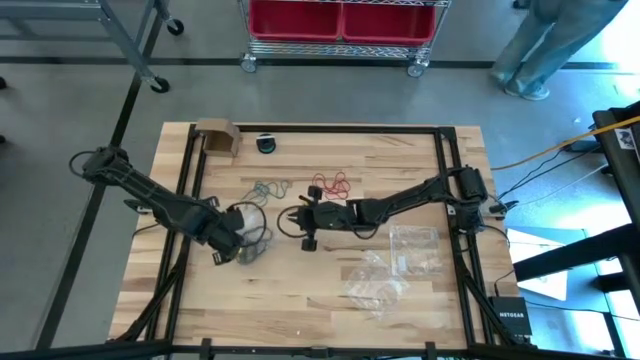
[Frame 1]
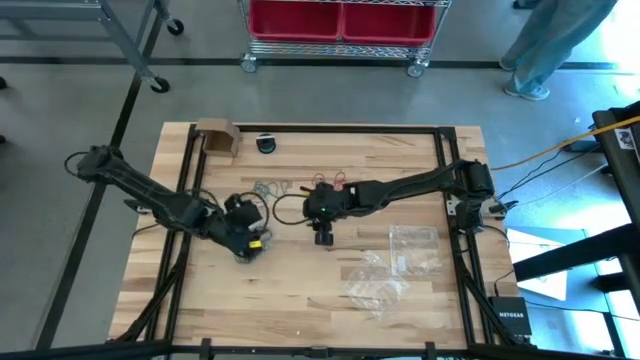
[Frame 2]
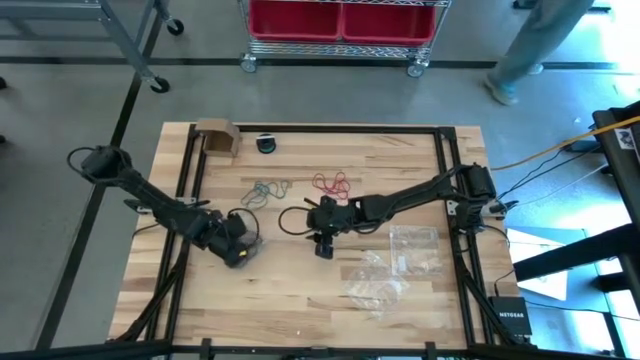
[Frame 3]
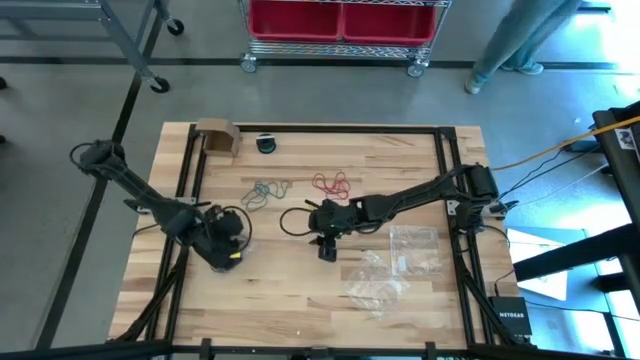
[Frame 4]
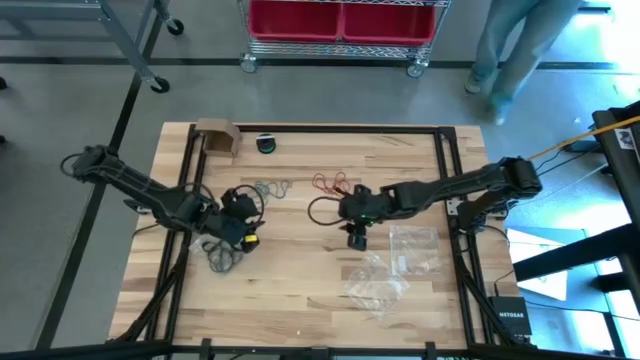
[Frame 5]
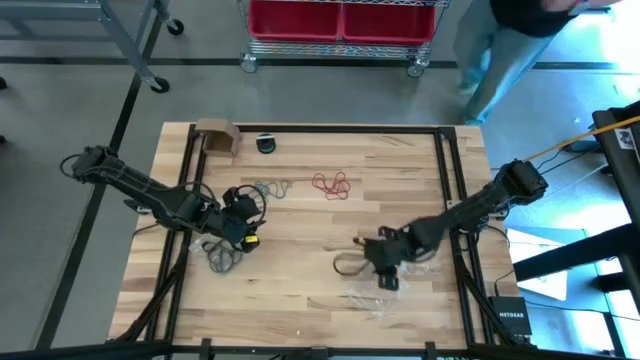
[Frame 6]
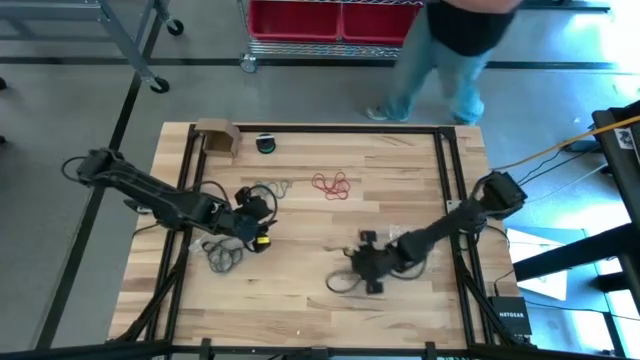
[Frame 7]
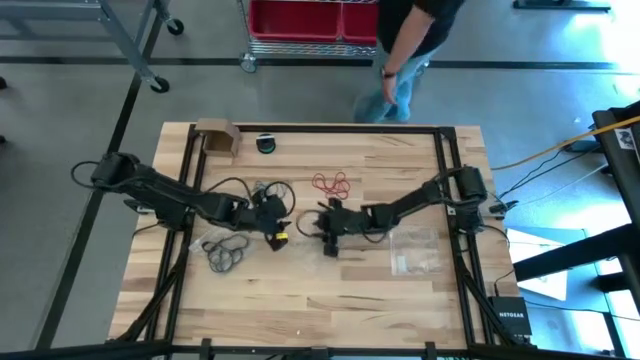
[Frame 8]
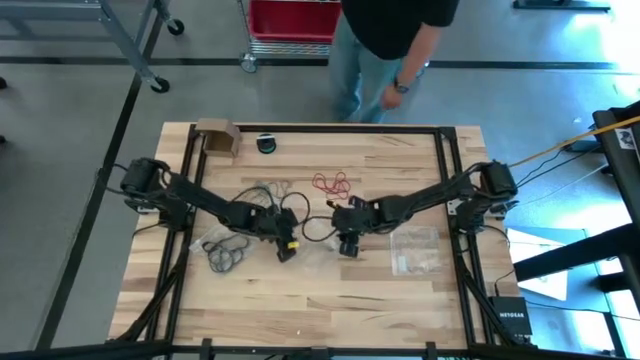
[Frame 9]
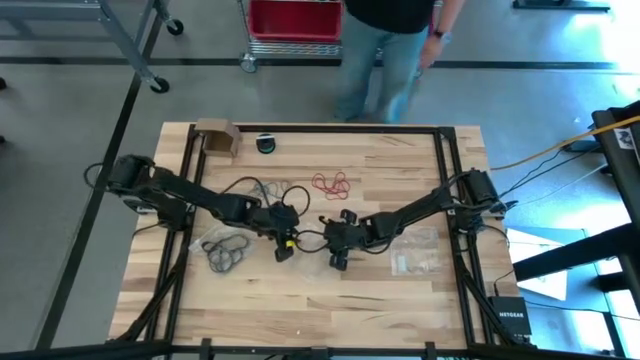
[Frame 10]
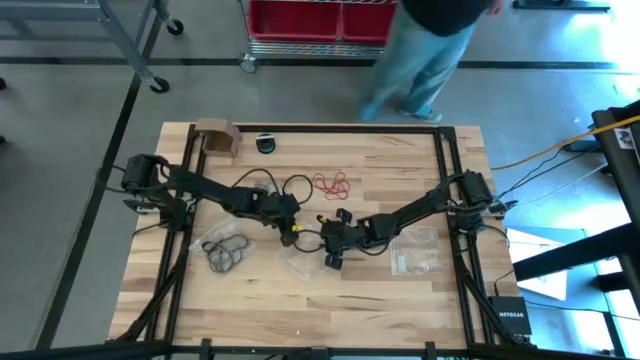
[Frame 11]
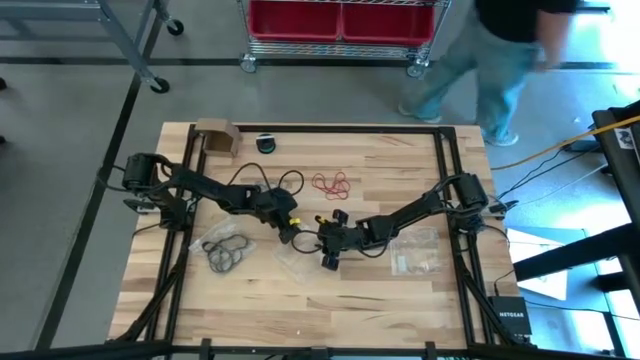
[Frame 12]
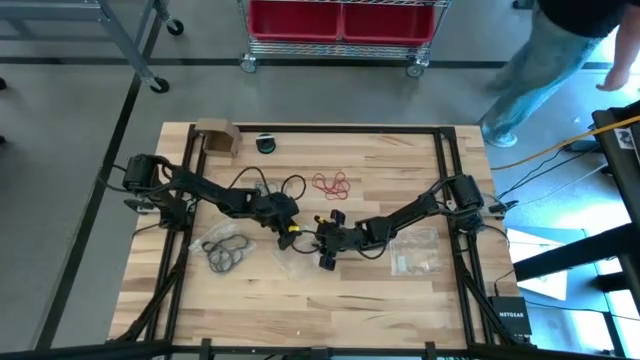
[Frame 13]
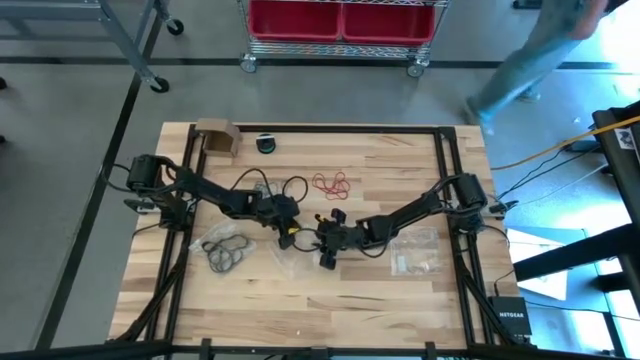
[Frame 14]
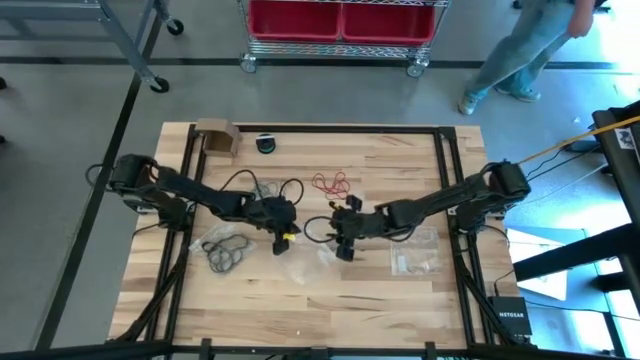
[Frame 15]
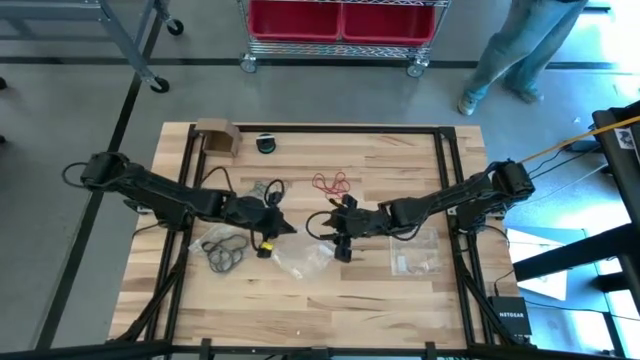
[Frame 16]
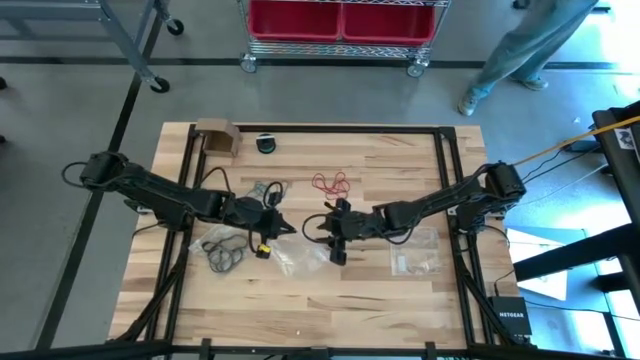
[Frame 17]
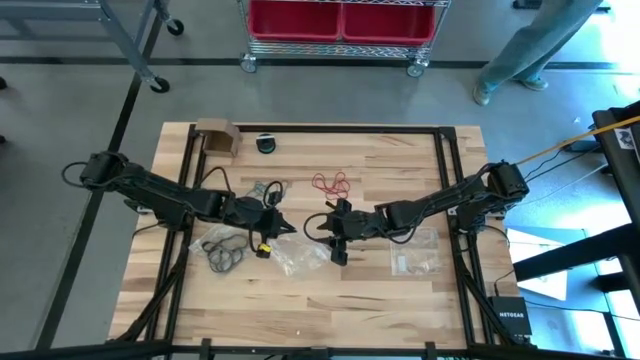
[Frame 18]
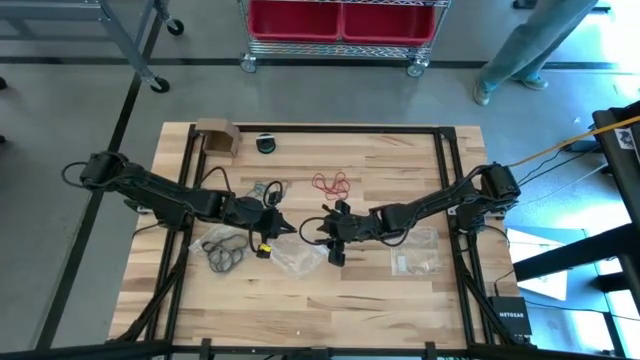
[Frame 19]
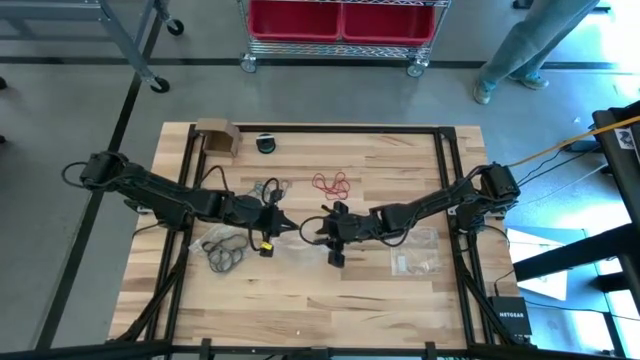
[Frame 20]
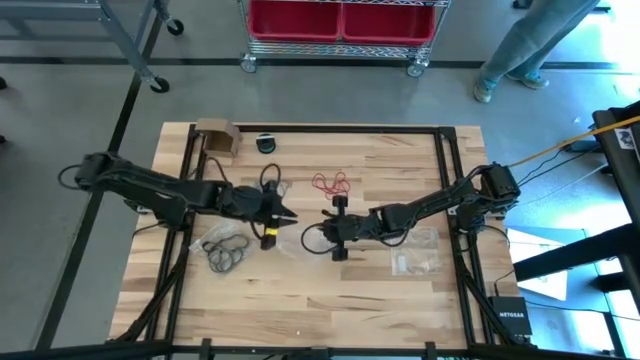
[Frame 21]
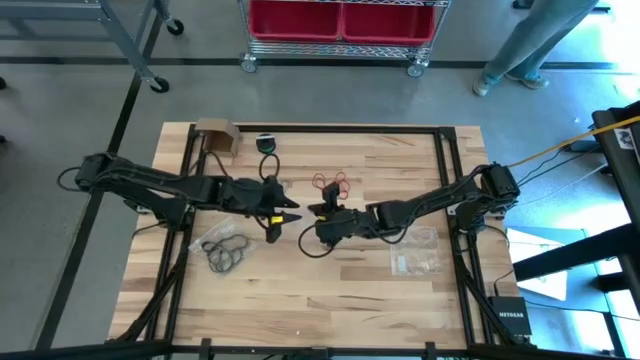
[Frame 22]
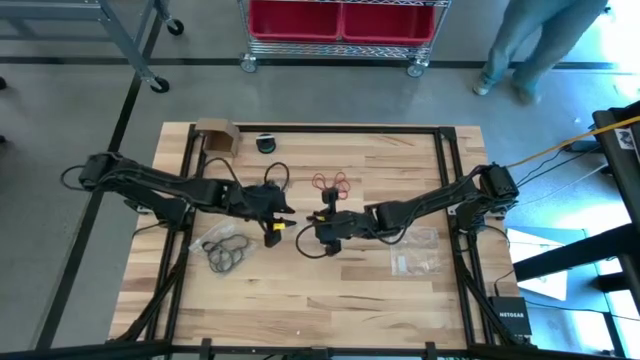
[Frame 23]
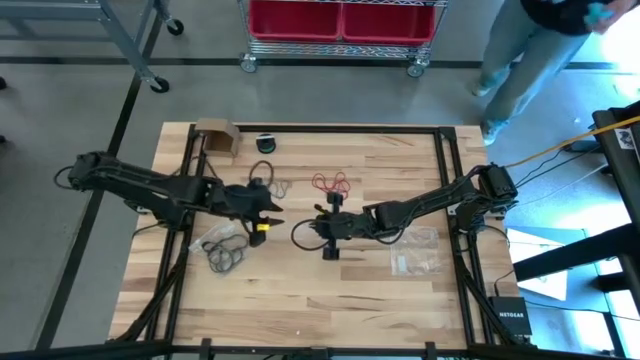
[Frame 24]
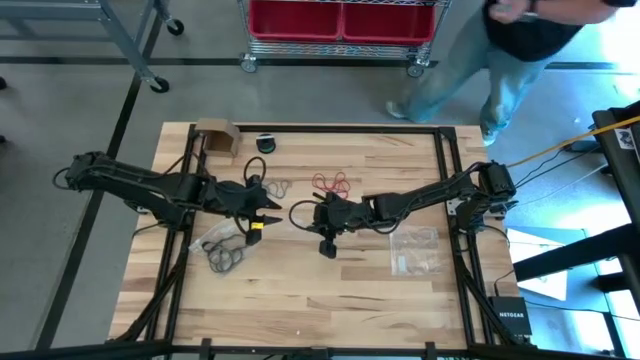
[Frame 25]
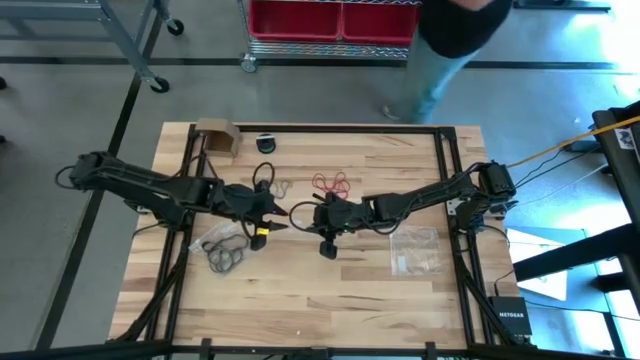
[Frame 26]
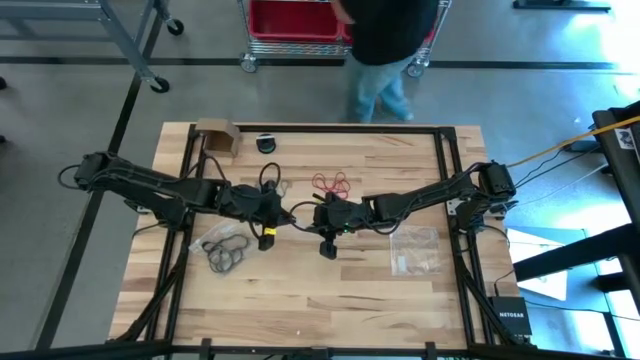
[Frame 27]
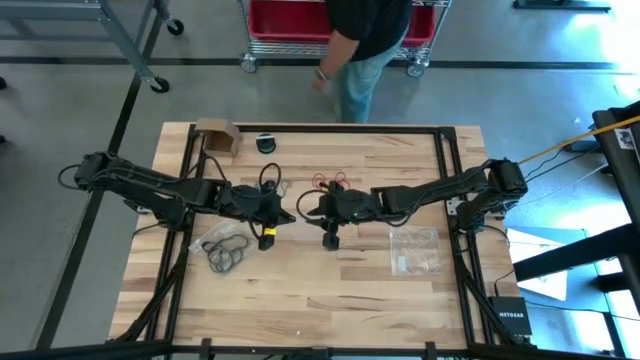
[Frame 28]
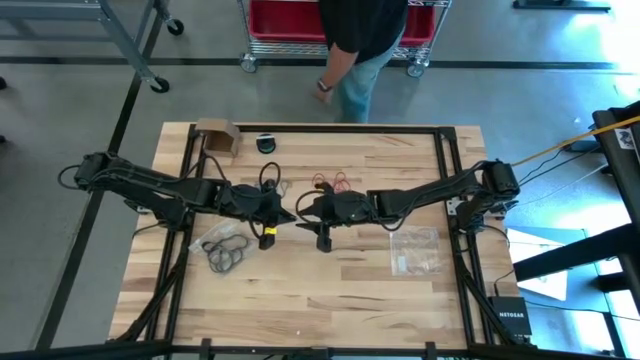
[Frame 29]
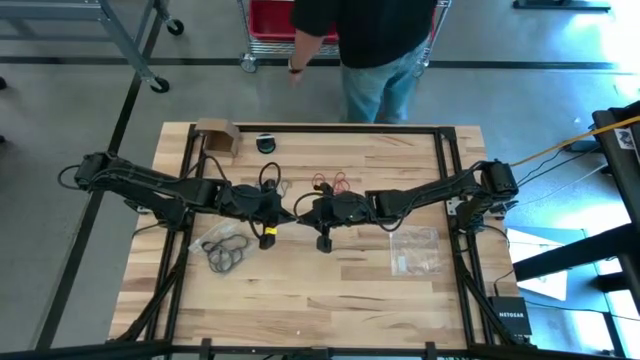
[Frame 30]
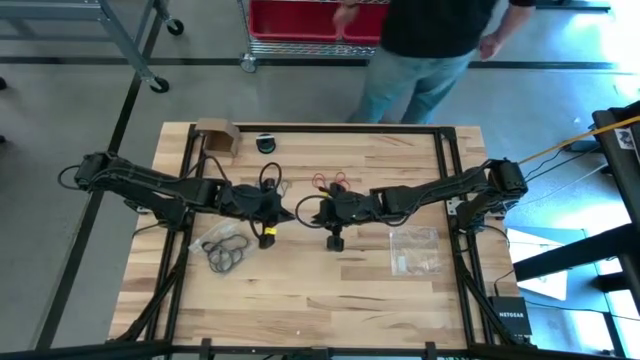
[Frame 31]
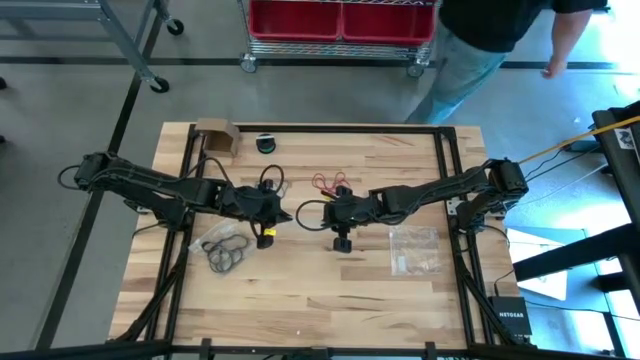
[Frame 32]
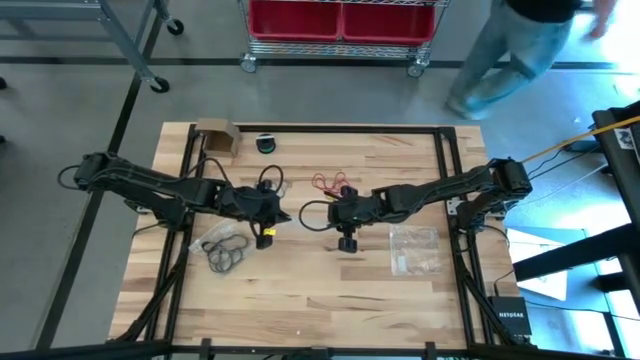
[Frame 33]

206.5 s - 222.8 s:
Task: Sort rubber bands
Open the transparent zip bag

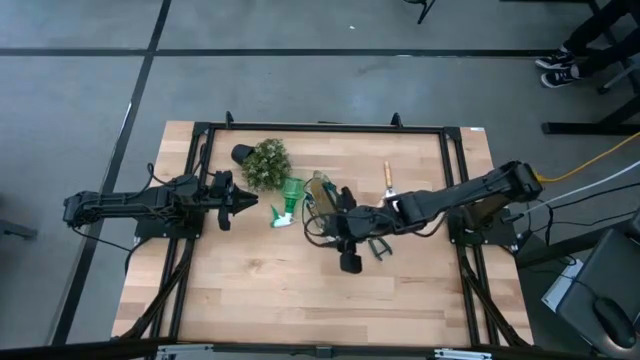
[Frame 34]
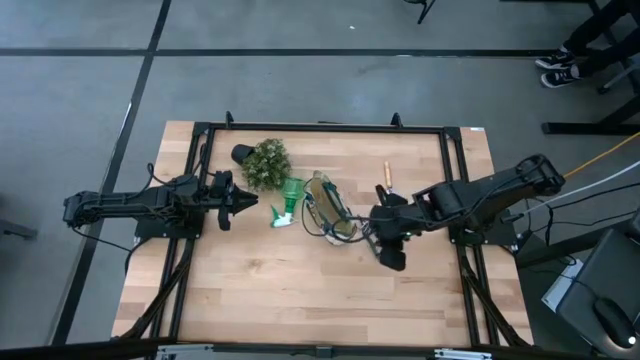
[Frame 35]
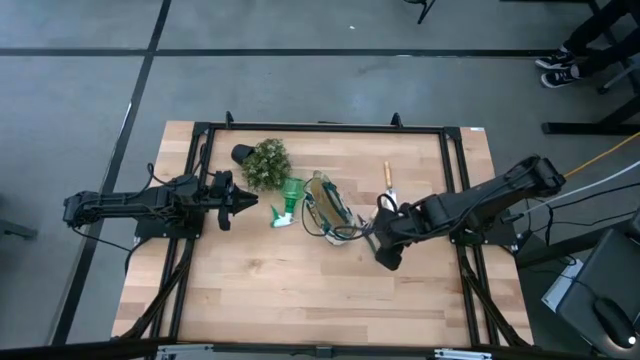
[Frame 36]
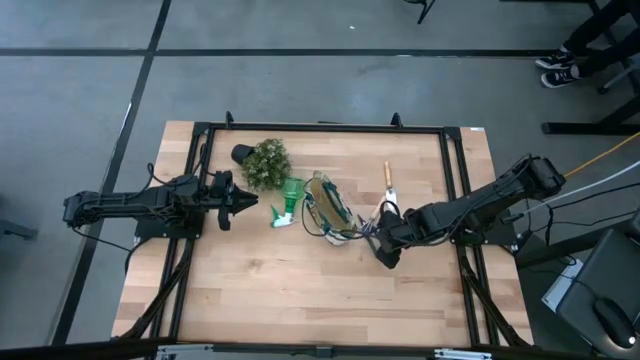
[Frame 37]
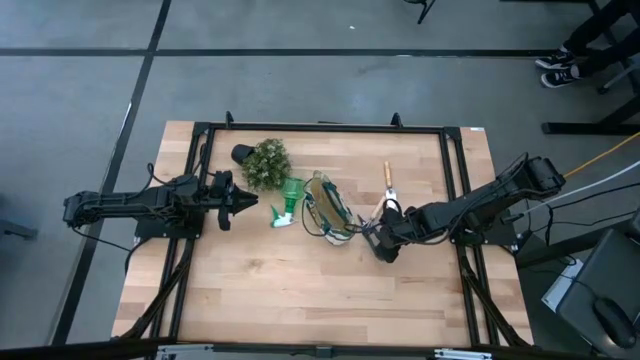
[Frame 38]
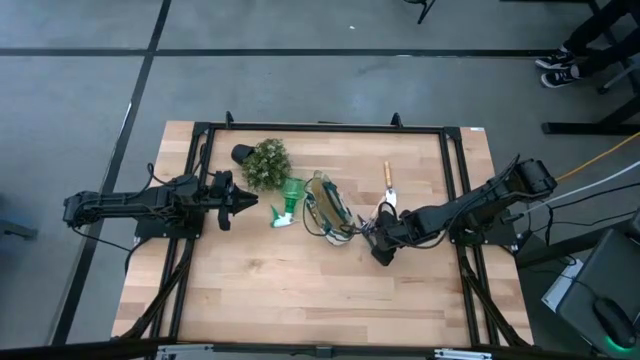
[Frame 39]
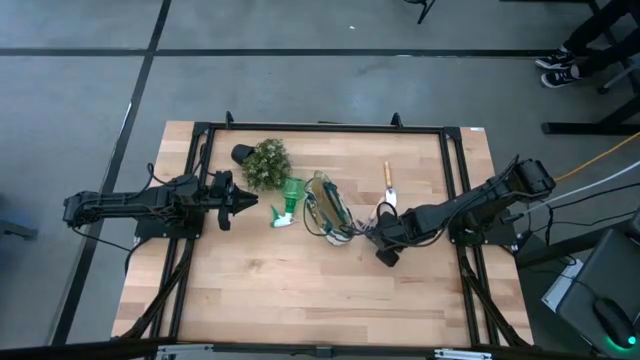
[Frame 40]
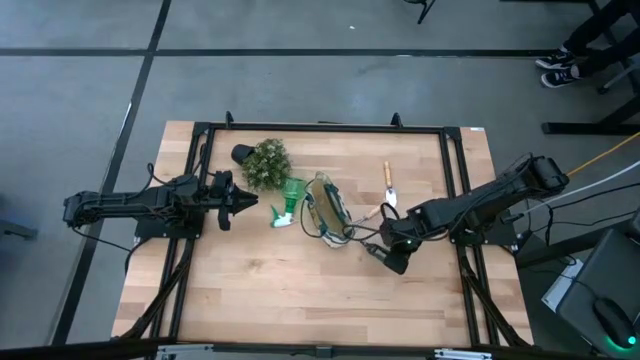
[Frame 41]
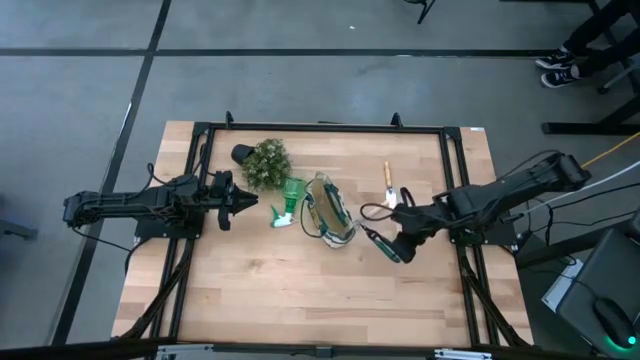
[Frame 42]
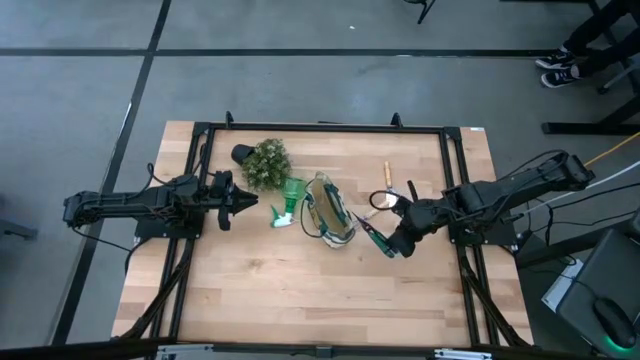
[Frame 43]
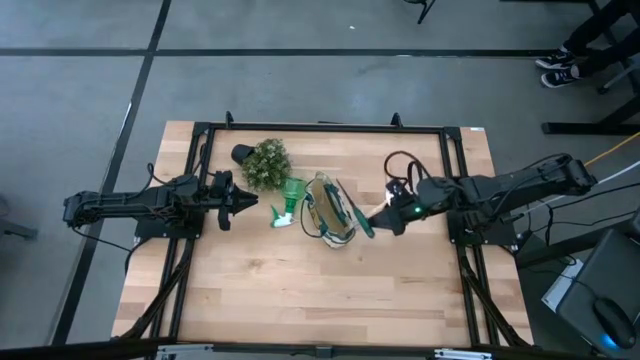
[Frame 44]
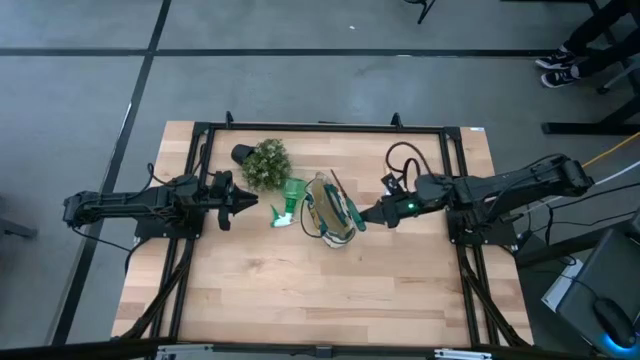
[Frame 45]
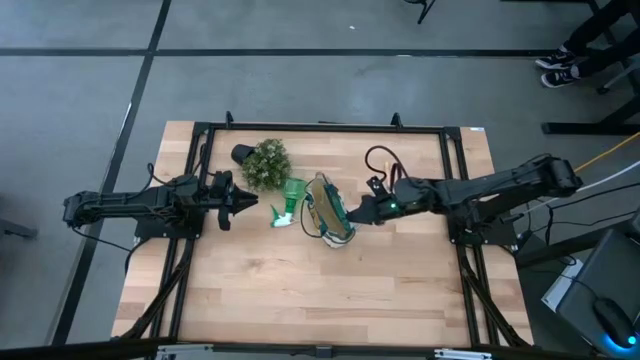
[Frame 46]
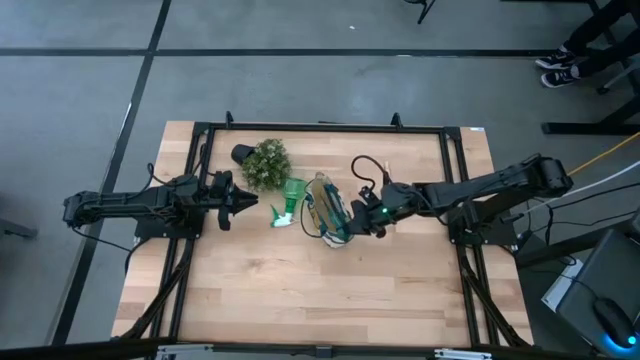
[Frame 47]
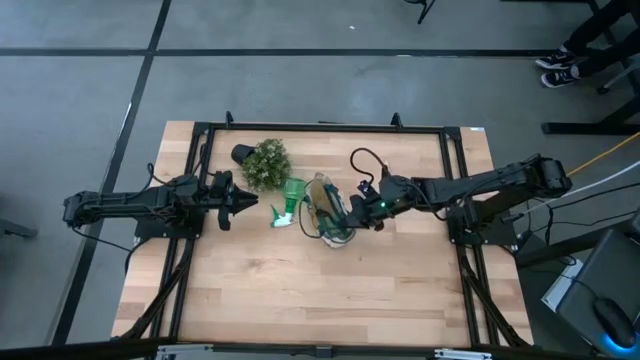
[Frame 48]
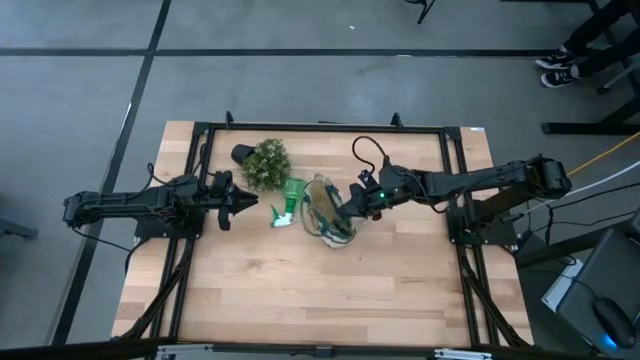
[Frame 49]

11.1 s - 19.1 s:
Task: Pick & Place Garden tools in Gardening bag
Put the green fruit pruner into the light brown gardening bag
